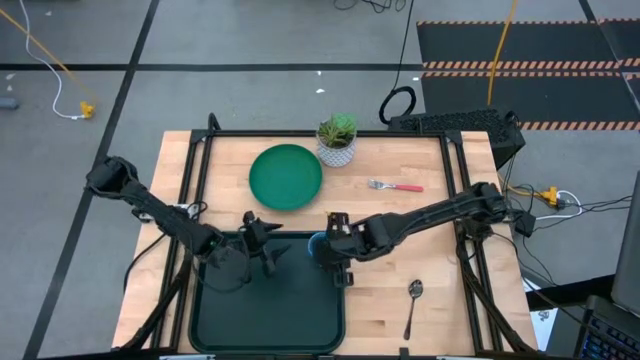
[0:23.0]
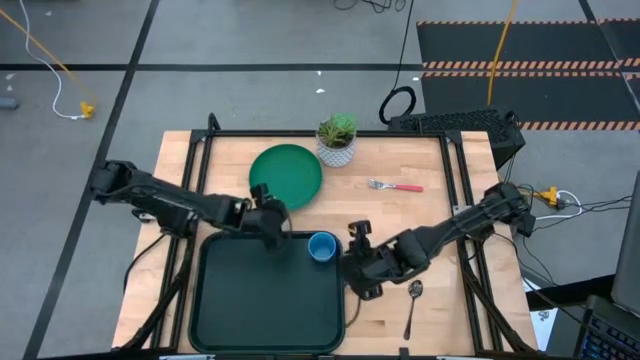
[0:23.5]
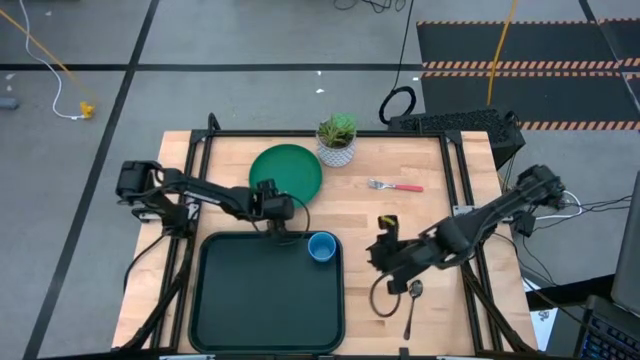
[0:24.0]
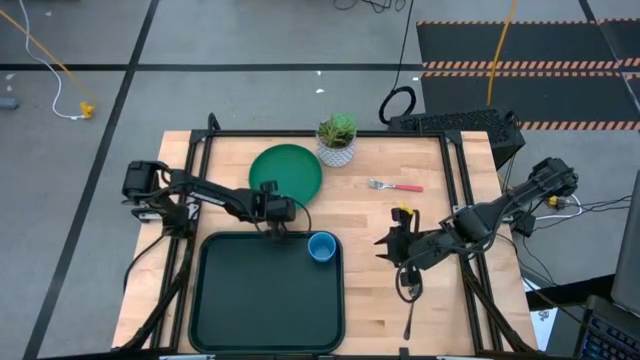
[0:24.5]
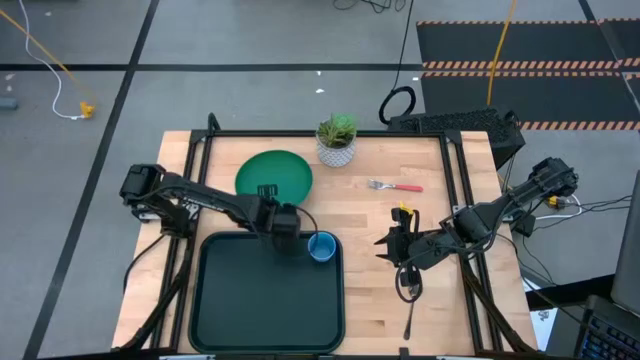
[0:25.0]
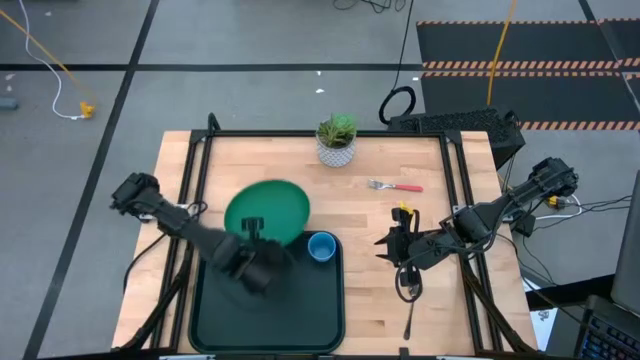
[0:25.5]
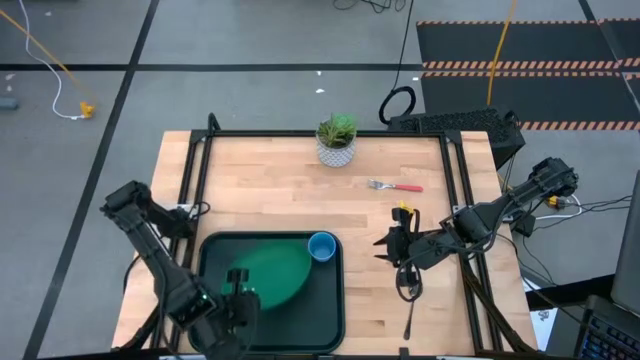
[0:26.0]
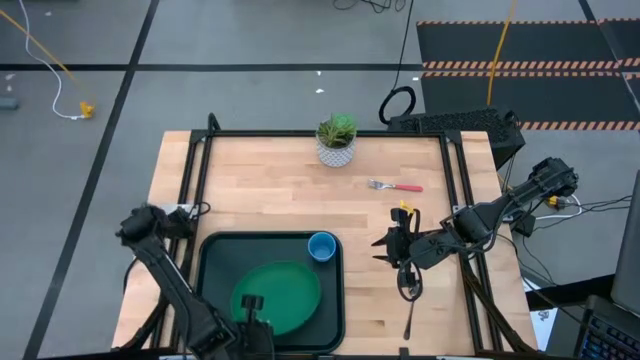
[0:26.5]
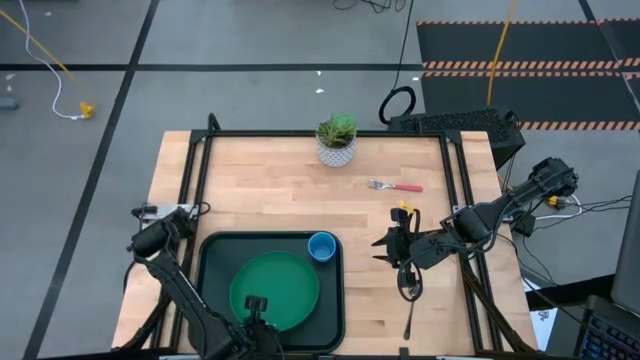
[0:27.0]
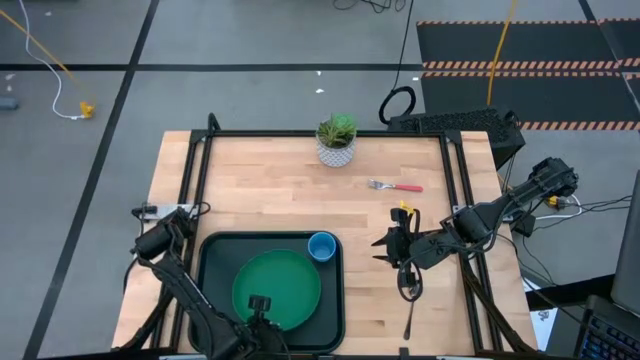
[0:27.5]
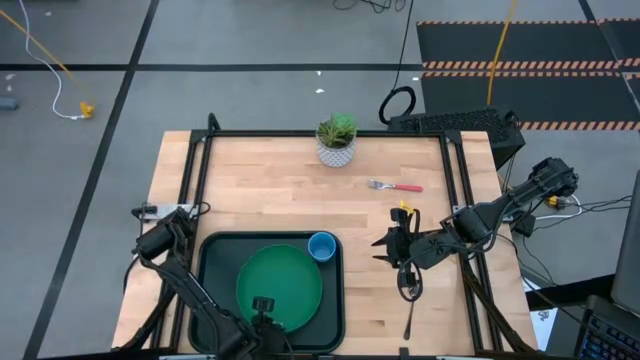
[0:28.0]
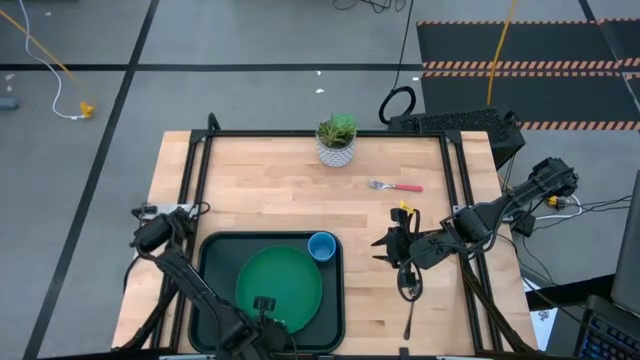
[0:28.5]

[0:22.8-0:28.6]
Task: Pick and place plate/cup/fork/spoon on tray
Put the green plate on the black tray to the bottom left of the blue cup

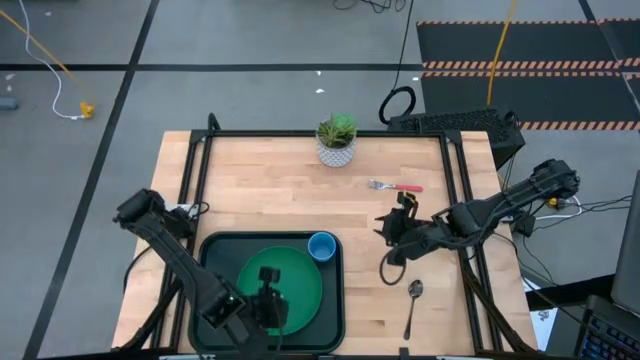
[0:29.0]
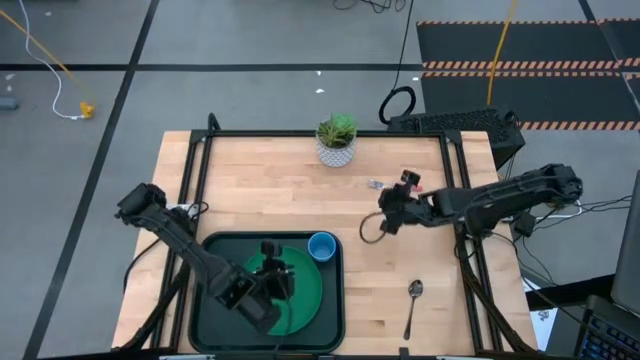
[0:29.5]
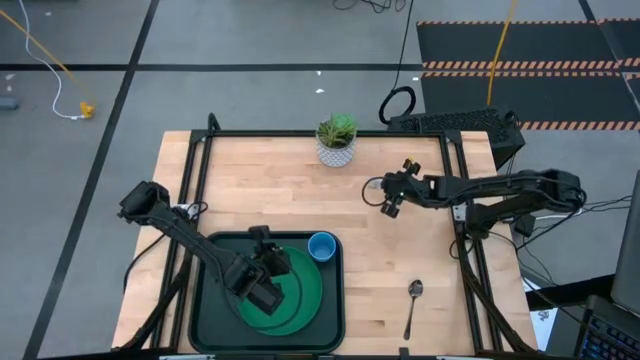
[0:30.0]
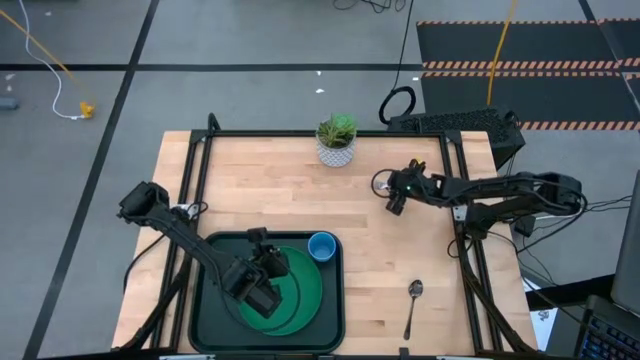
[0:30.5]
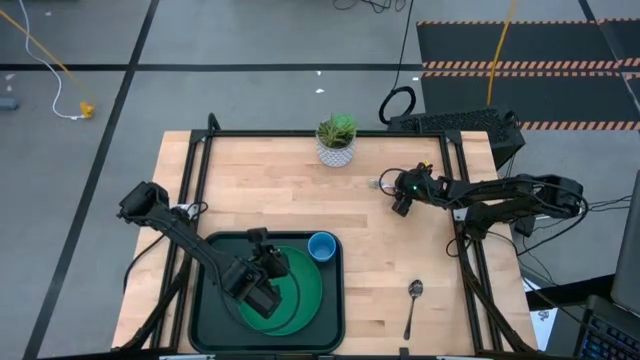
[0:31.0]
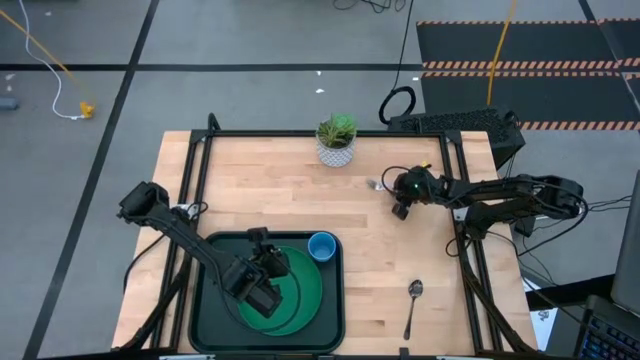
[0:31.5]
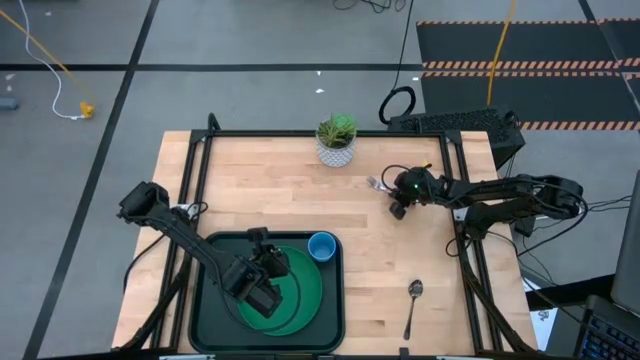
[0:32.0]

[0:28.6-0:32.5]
Put the red fork on the black tray to the left of the green plate

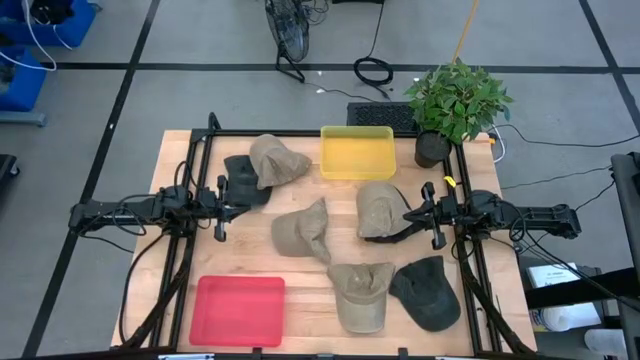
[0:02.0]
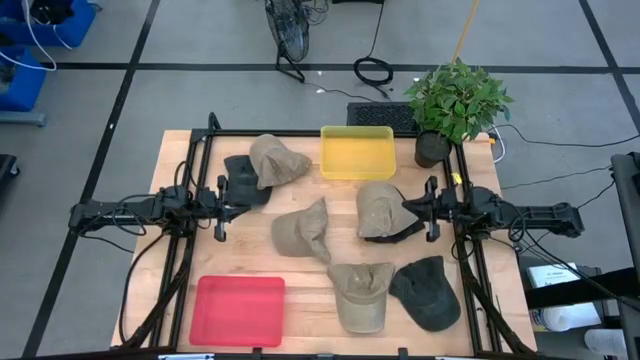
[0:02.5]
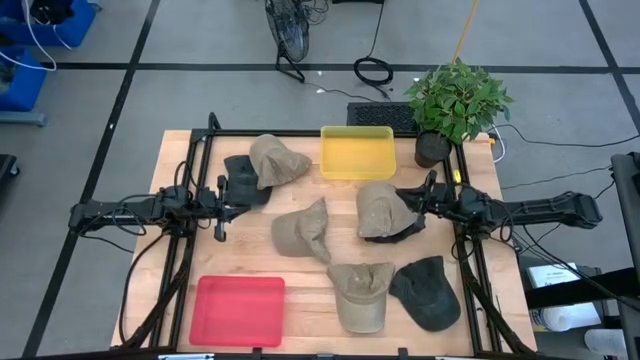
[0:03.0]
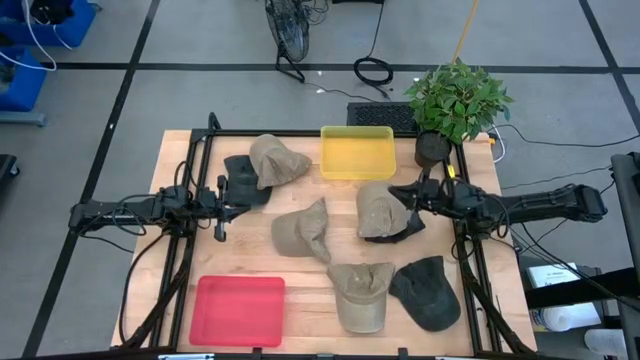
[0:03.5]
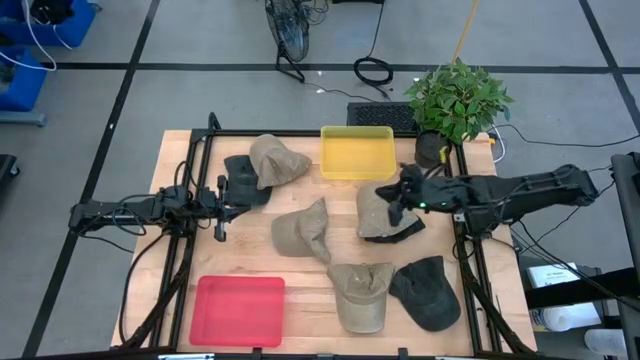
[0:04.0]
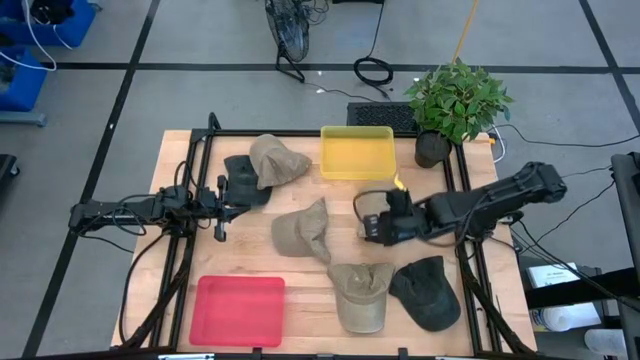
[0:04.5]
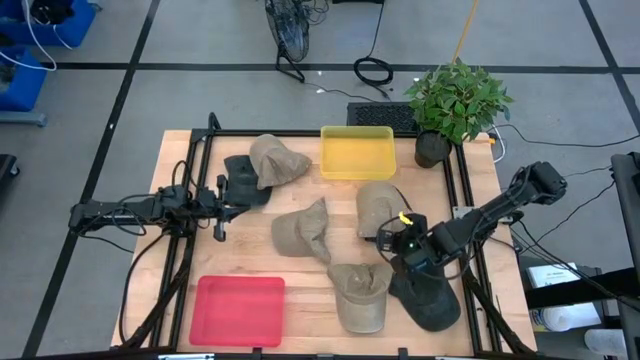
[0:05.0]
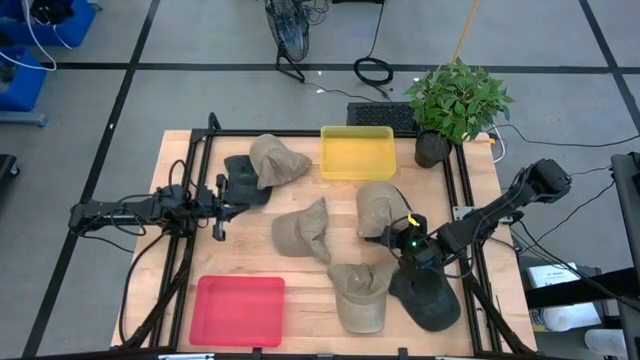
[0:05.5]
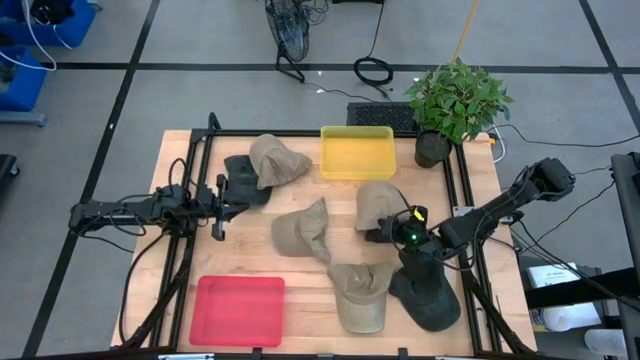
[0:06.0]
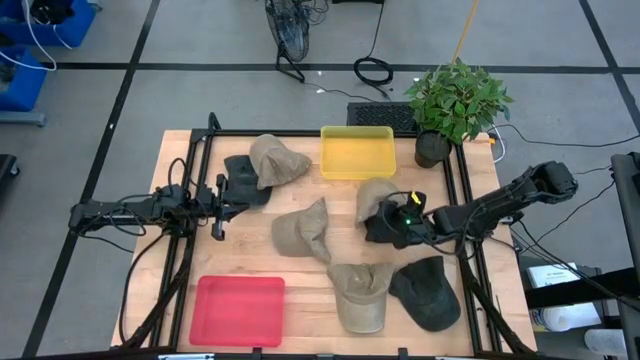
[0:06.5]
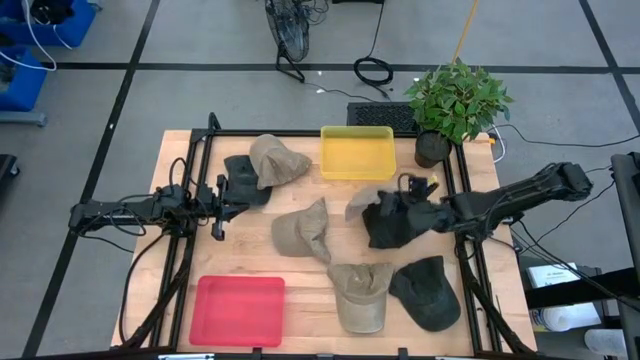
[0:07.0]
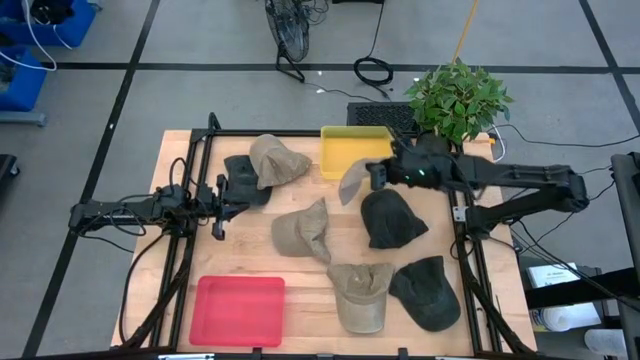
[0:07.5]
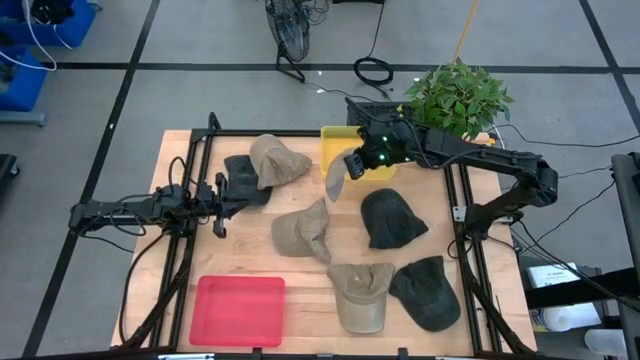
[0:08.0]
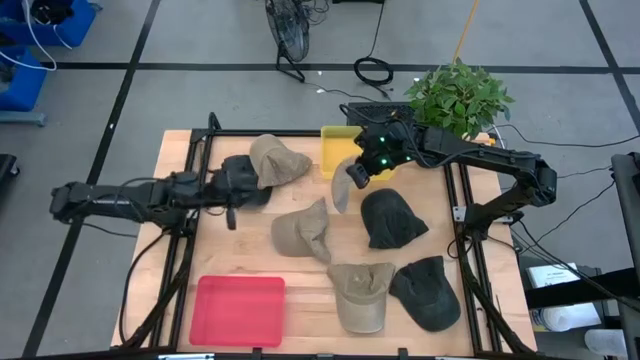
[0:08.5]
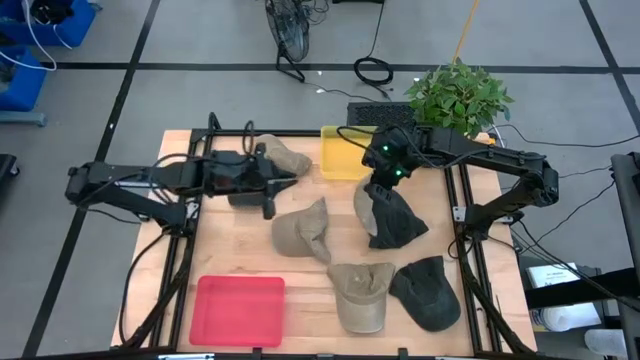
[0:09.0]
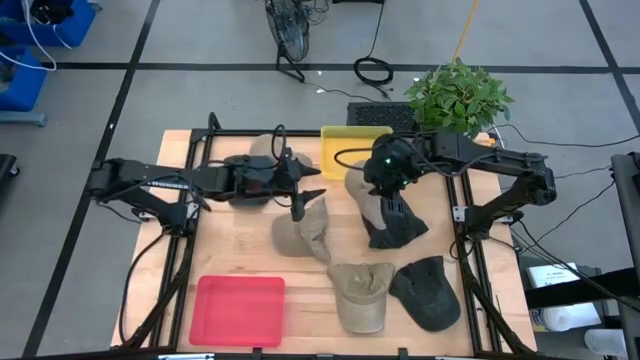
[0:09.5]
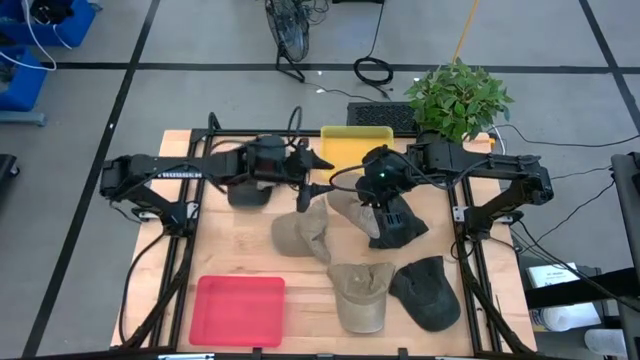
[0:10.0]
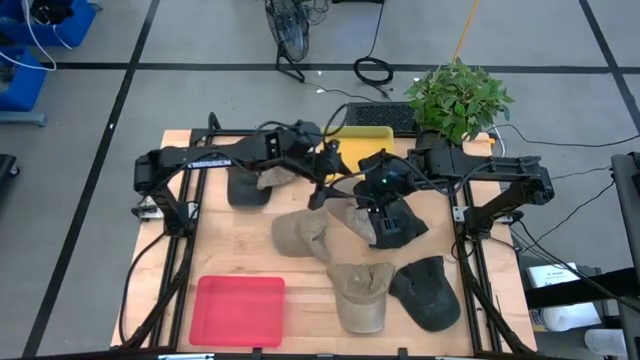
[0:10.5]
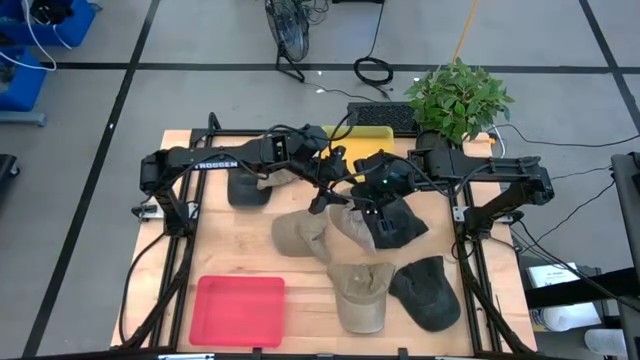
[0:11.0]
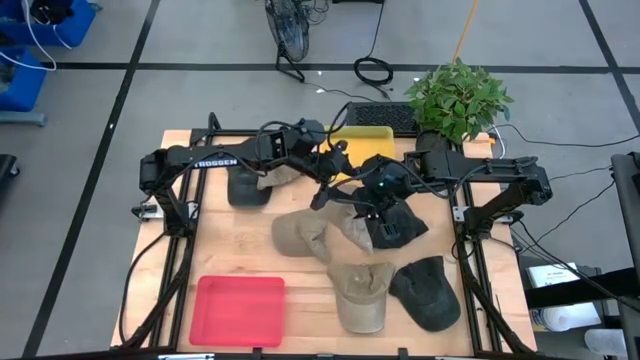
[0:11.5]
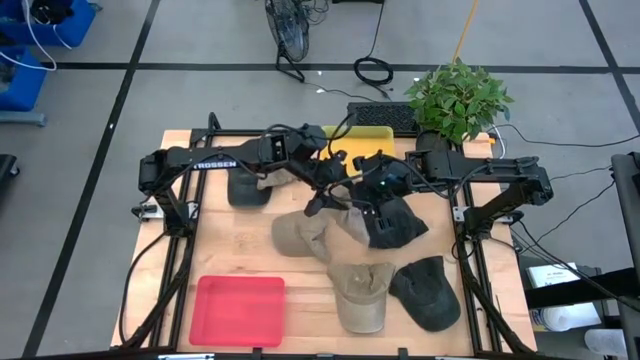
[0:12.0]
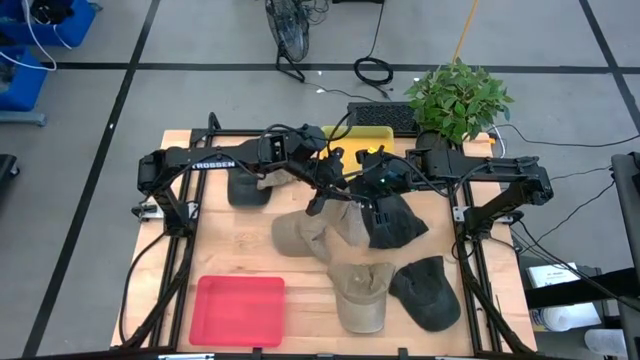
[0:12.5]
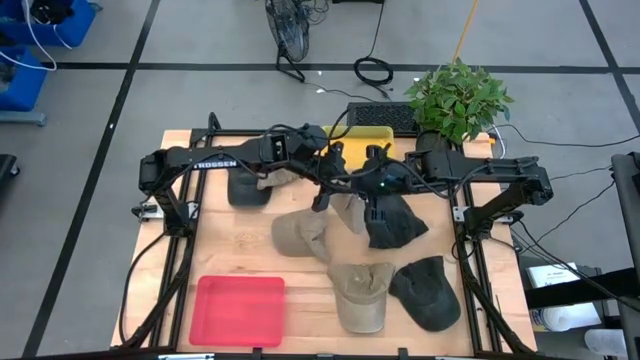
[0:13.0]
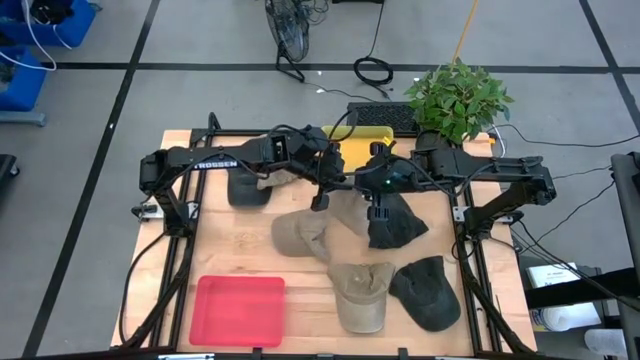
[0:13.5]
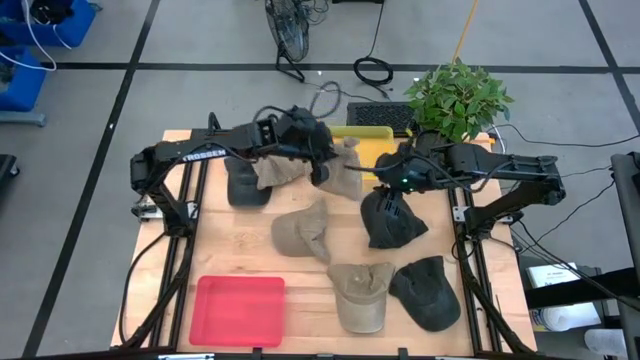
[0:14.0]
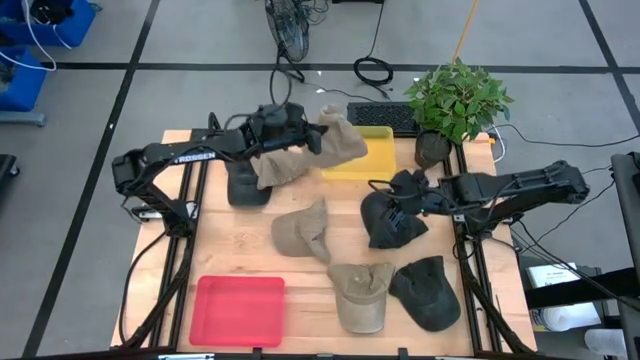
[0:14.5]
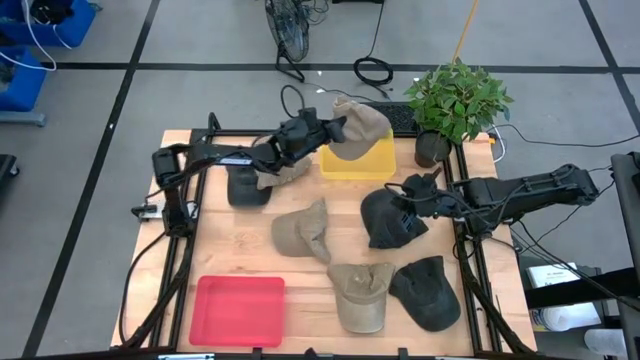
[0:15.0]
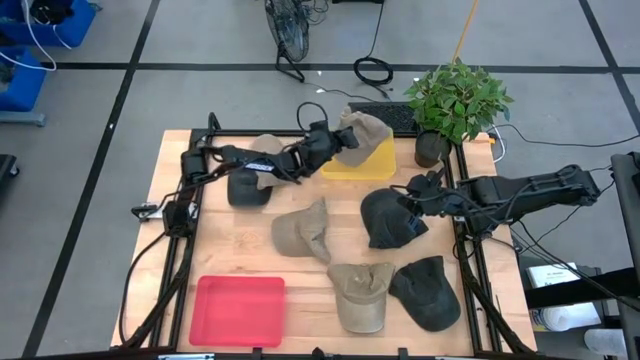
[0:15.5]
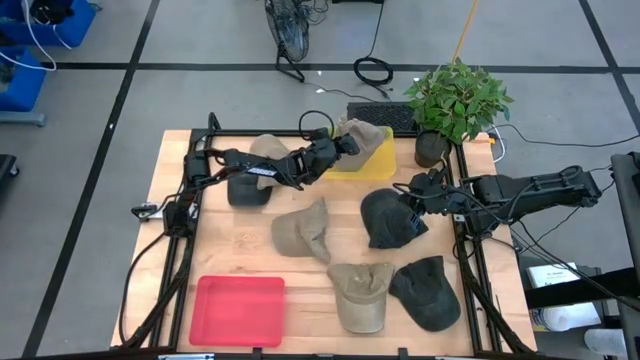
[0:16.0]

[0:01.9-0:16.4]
Task: Pick & Place hat
Put the brown cap into the yellow bin
